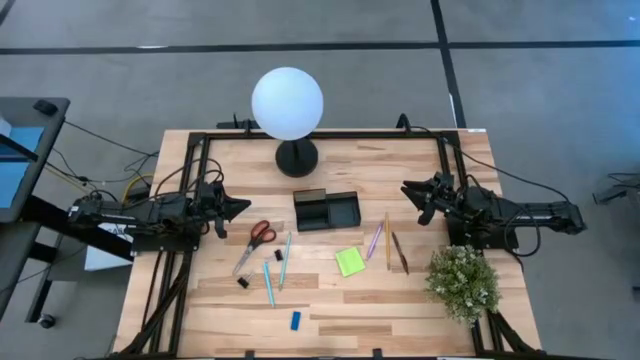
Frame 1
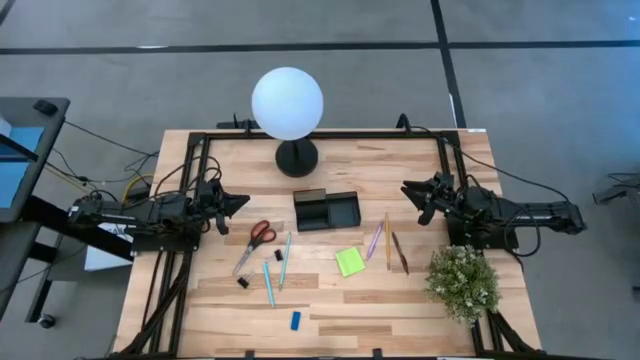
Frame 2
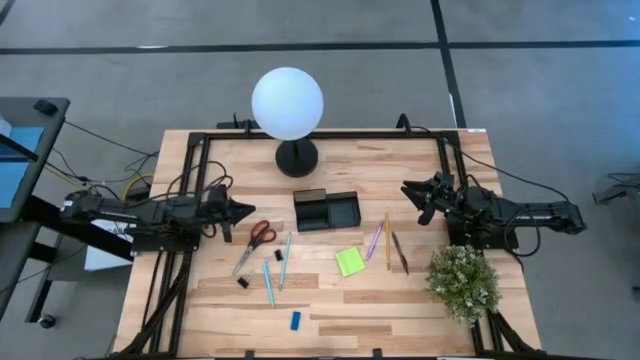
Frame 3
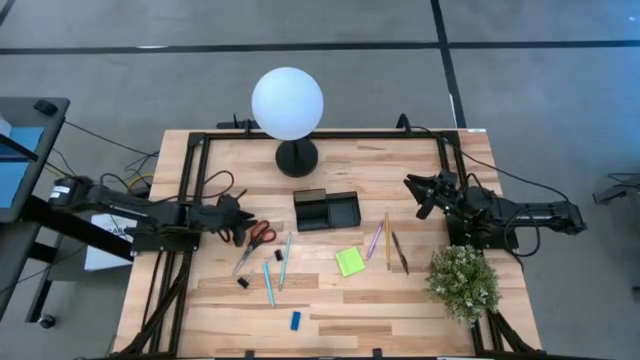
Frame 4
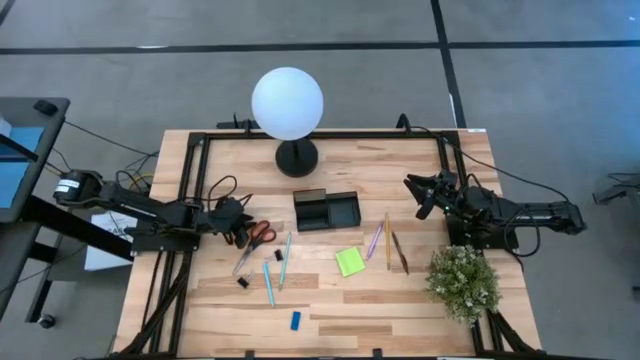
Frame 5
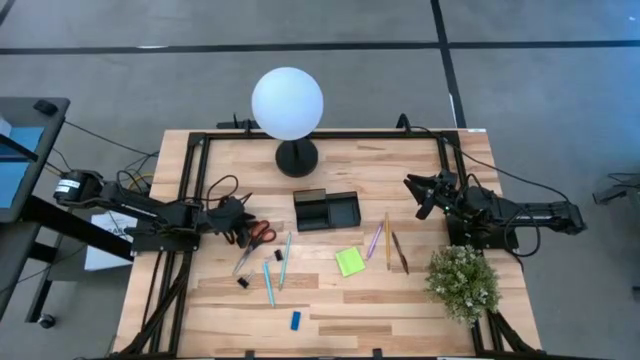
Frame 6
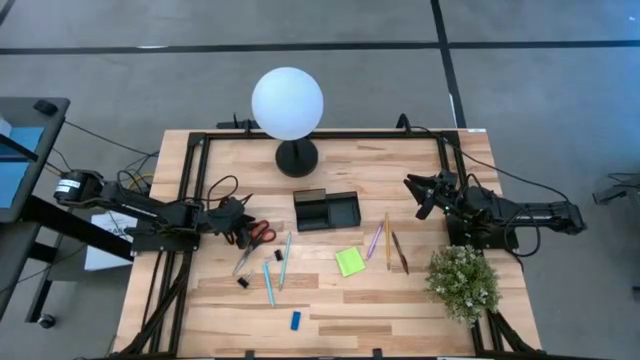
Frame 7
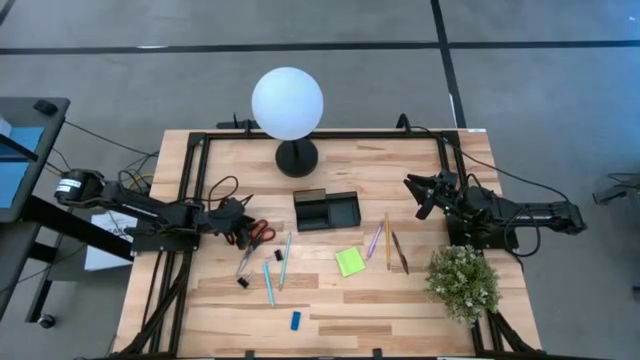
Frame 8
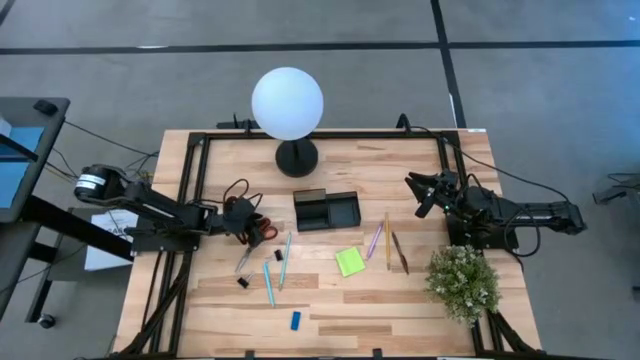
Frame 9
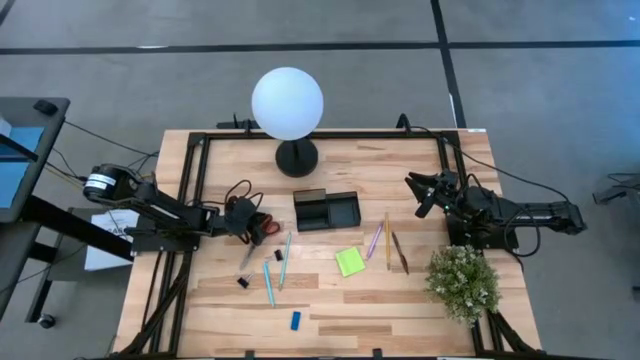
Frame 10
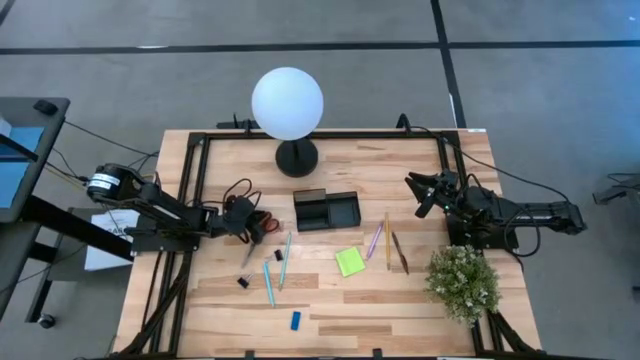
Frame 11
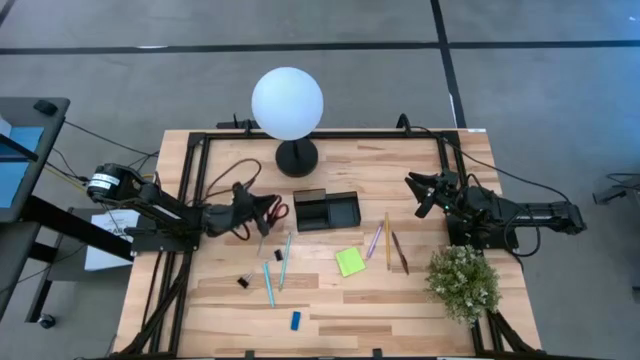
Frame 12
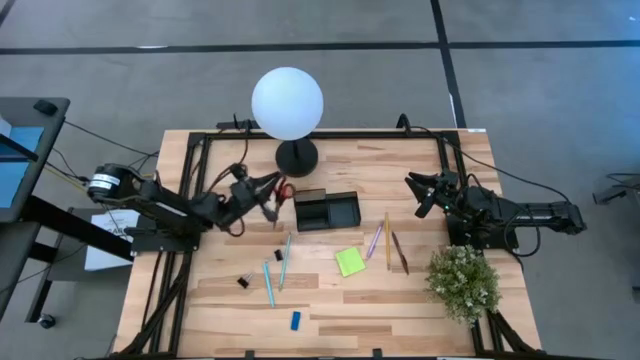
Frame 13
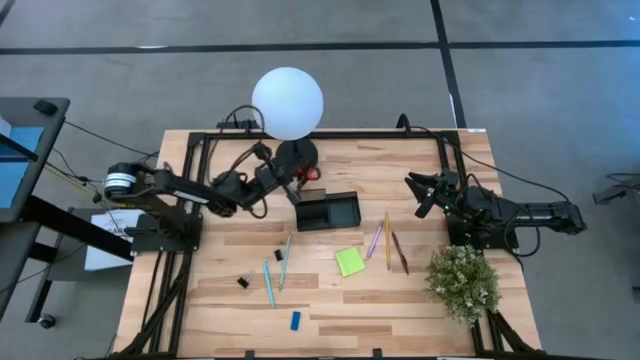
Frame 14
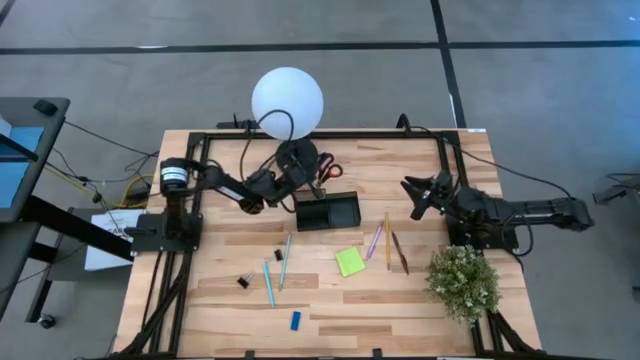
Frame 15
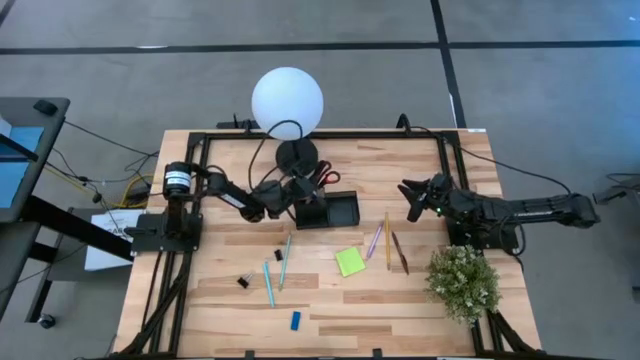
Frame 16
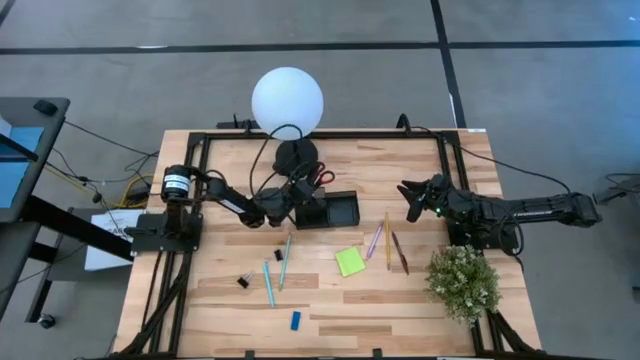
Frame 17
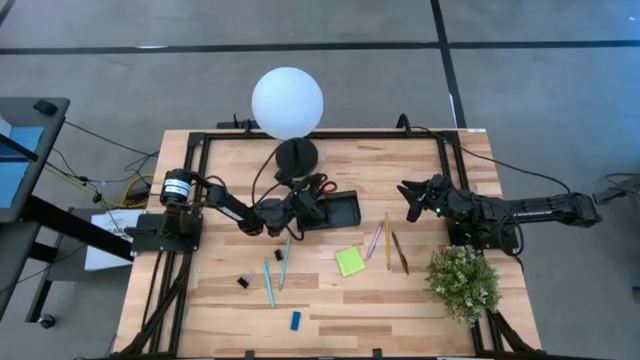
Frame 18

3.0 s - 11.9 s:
Task: Pick and place office supplies into organizer
Put the scissors into the desk organizer

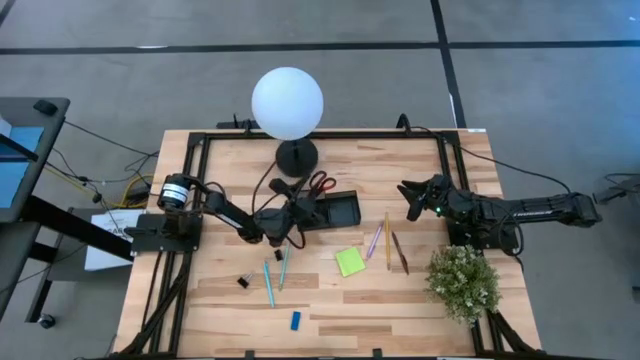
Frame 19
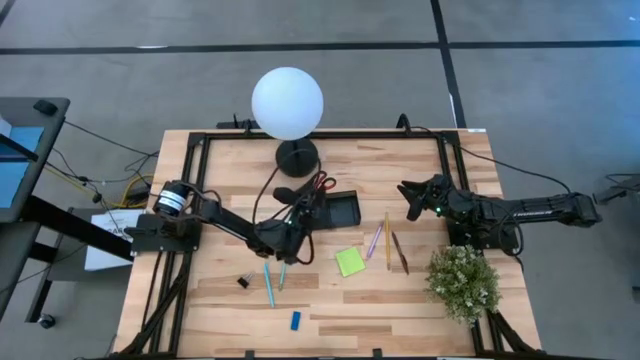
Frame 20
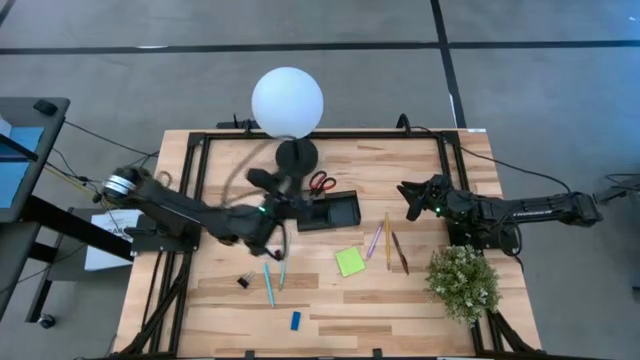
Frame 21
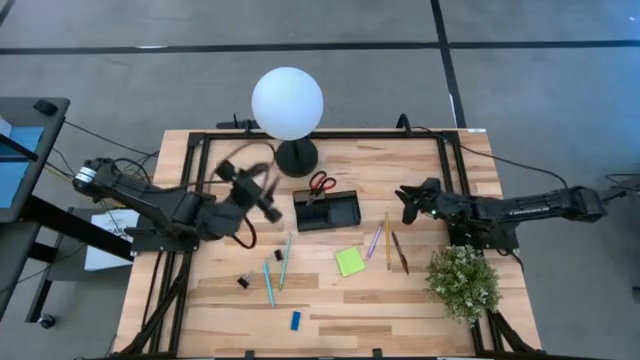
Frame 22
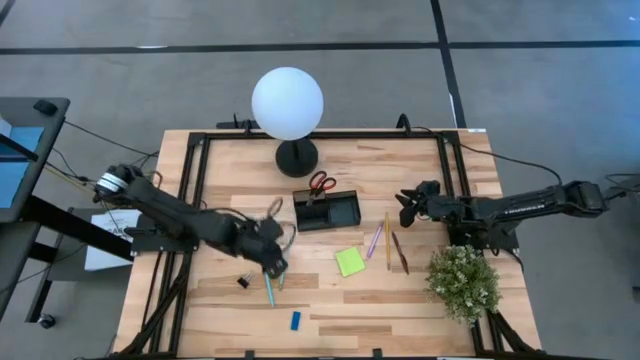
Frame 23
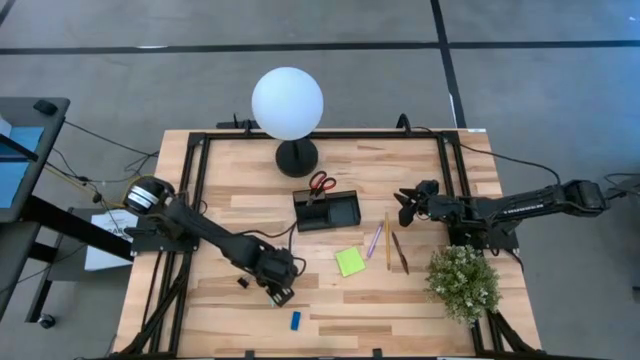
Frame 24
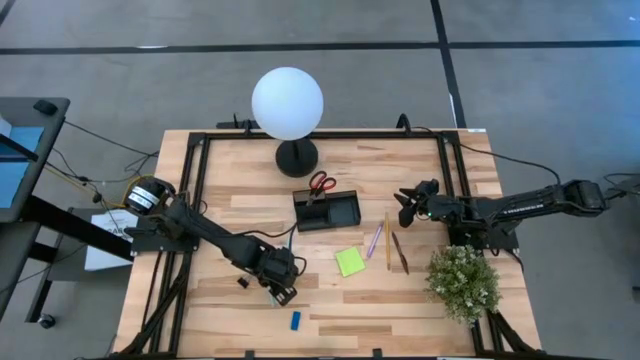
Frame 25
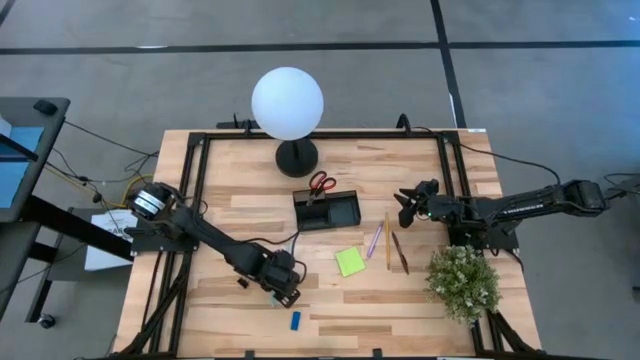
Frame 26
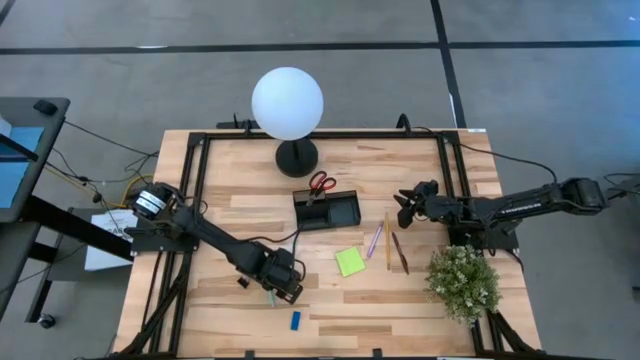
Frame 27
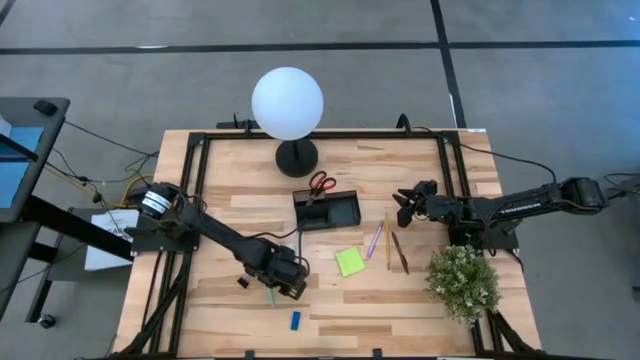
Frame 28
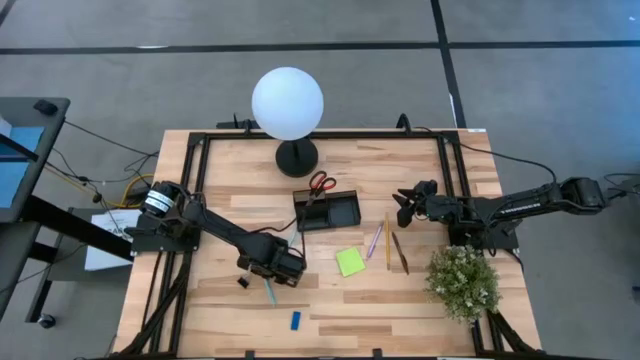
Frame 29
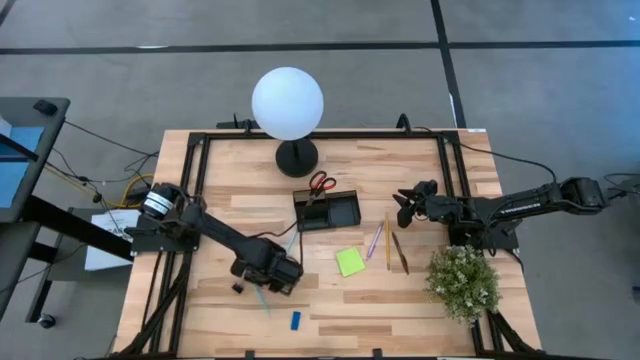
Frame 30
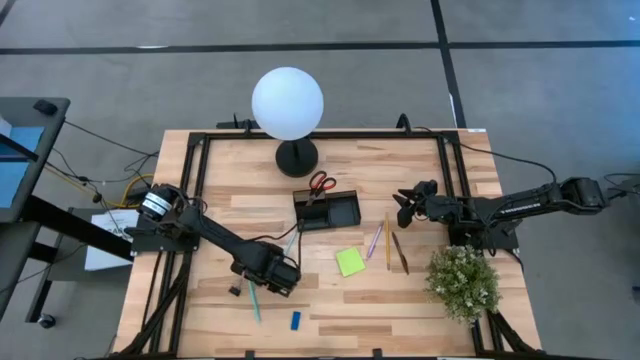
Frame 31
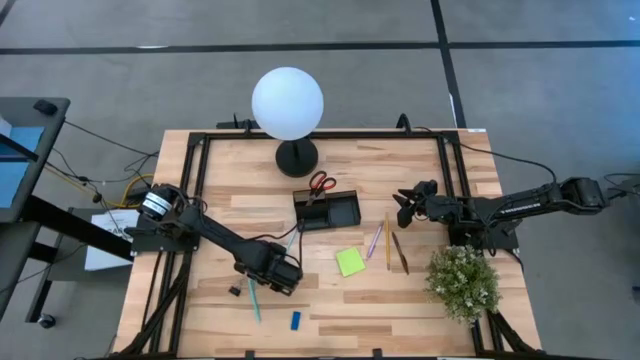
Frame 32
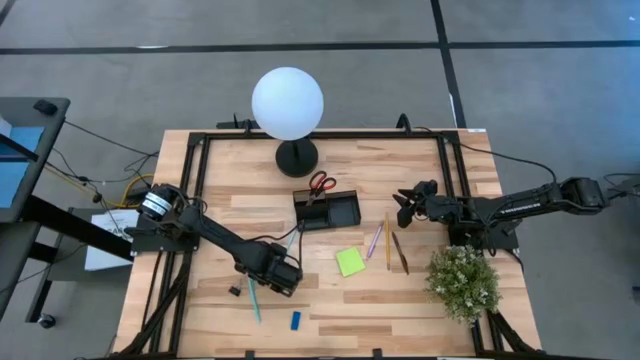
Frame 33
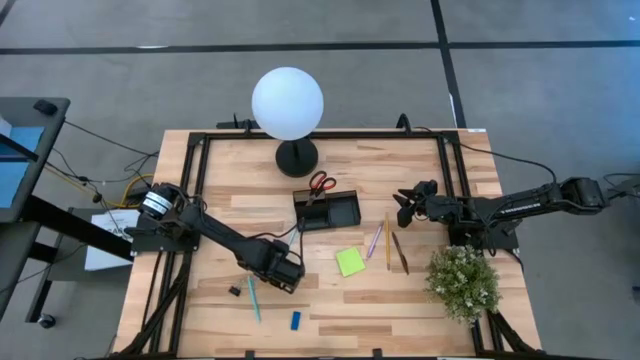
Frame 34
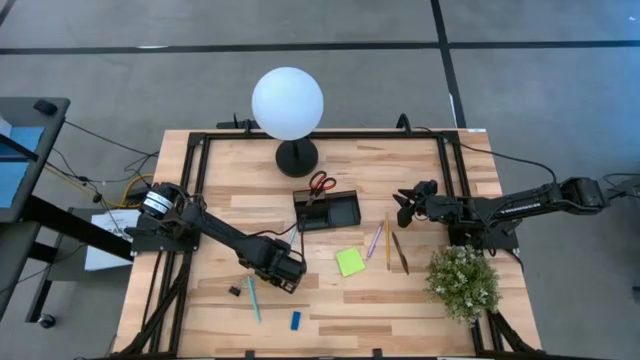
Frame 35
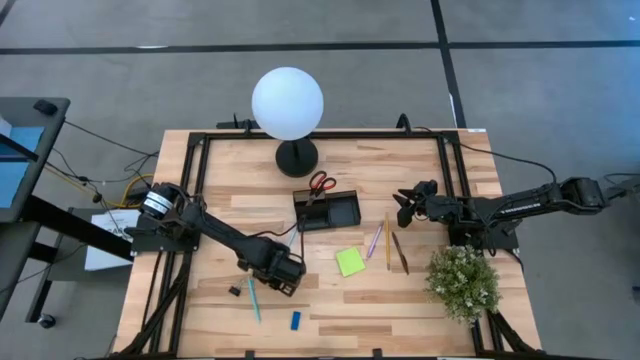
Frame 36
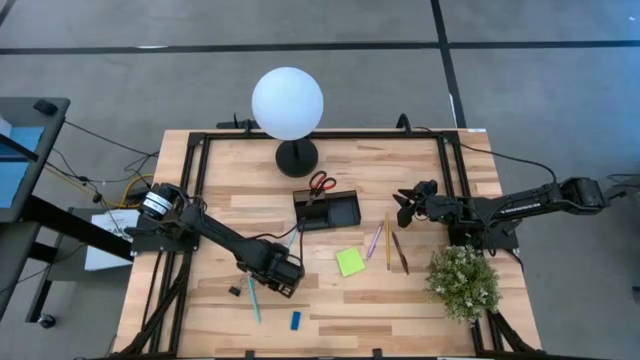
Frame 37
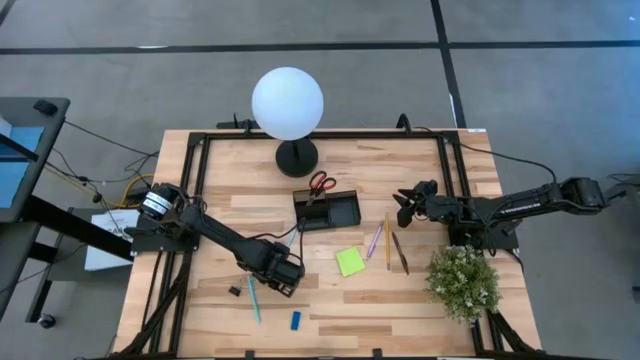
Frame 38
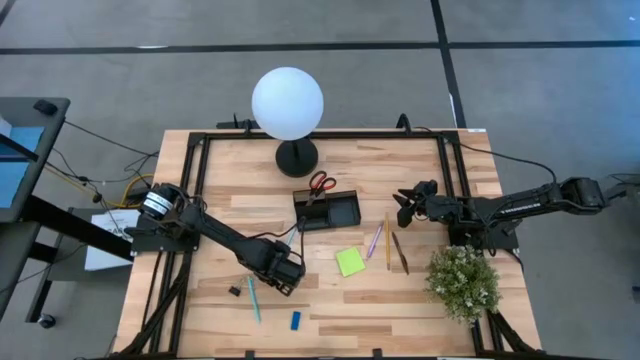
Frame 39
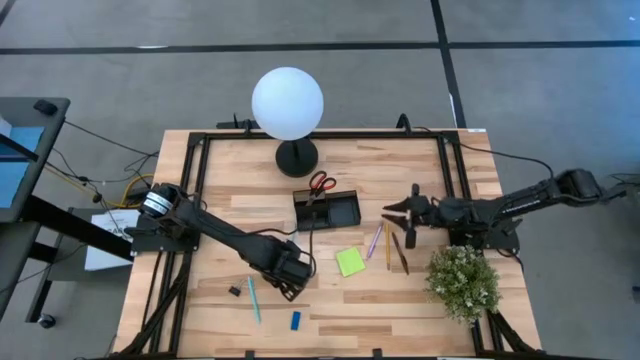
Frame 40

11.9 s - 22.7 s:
Put the light blue pencil into the desk organizer

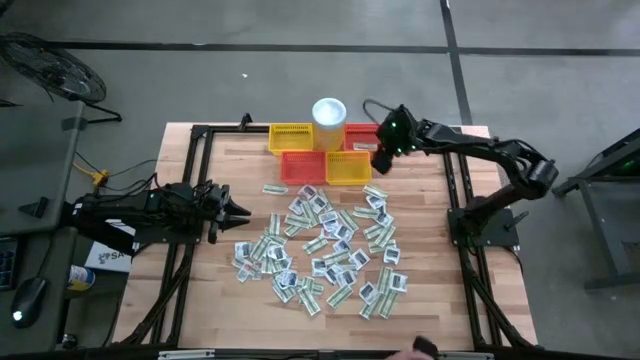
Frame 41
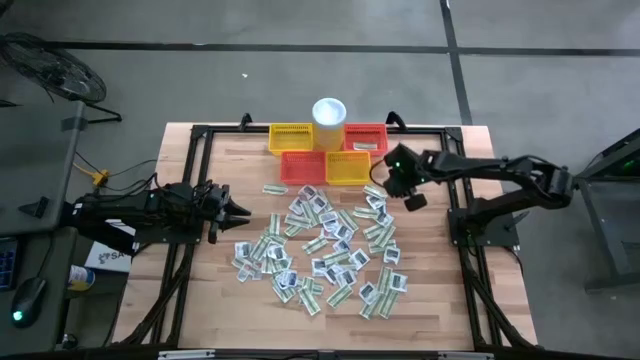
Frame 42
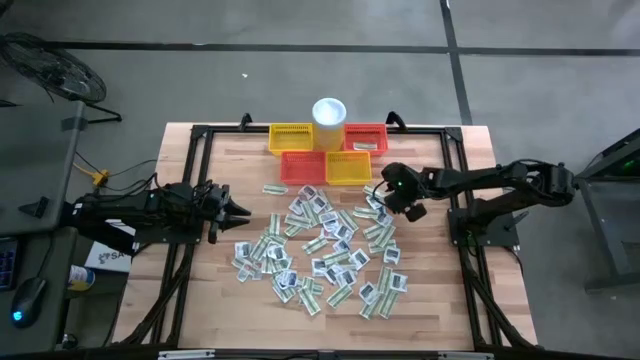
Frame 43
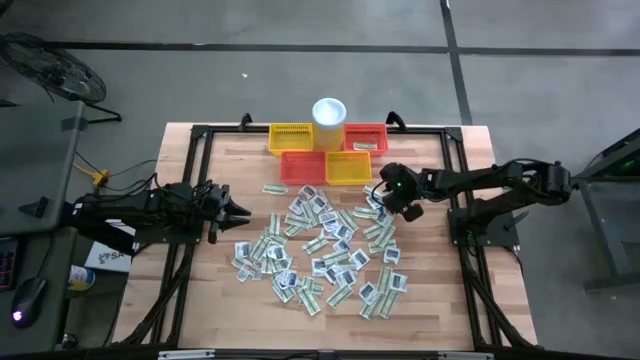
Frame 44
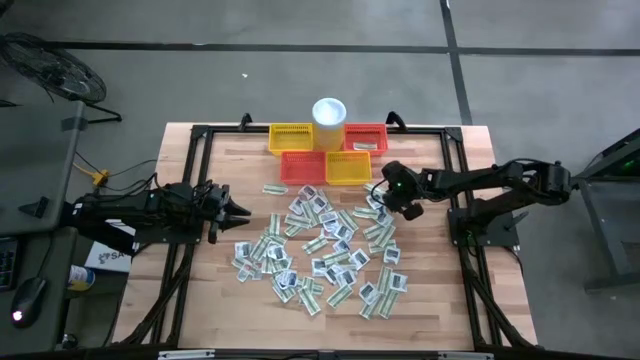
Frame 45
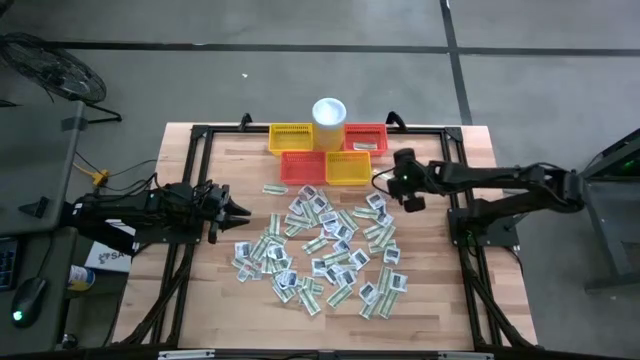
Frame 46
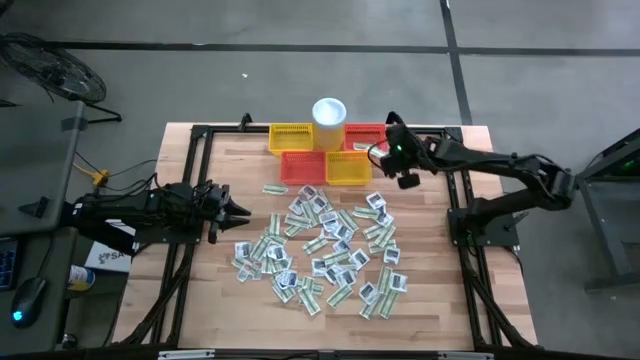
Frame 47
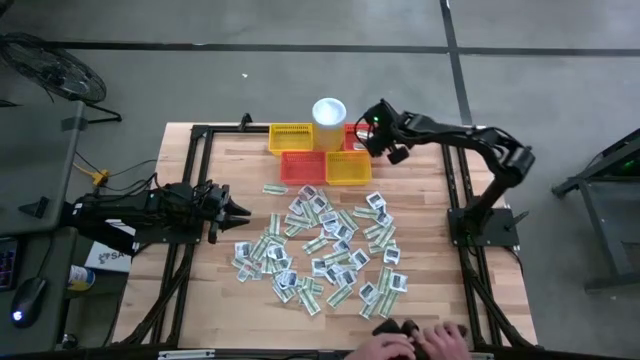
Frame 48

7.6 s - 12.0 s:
Task: Pick & Place First Aid Supplies
Put the green bandage pack into the top orange basket
